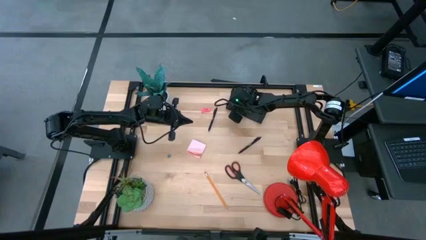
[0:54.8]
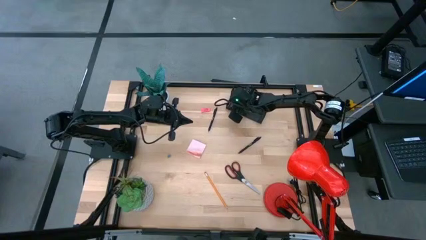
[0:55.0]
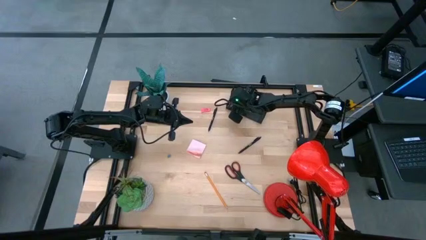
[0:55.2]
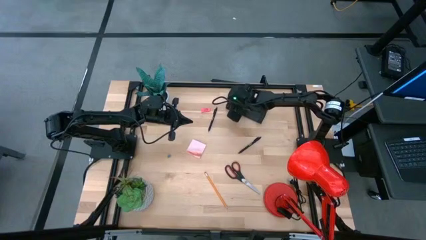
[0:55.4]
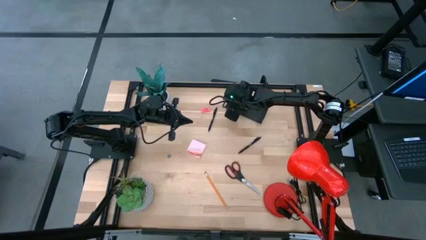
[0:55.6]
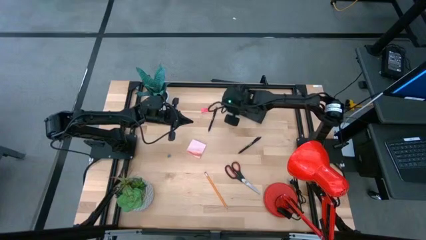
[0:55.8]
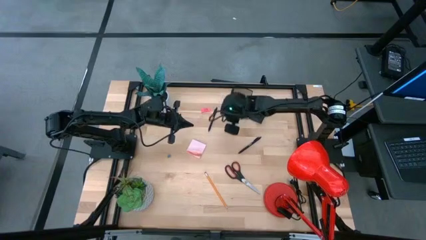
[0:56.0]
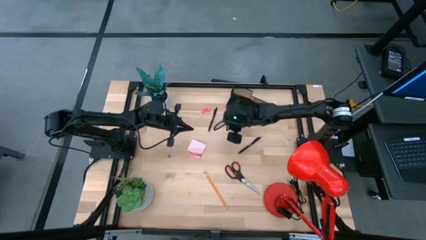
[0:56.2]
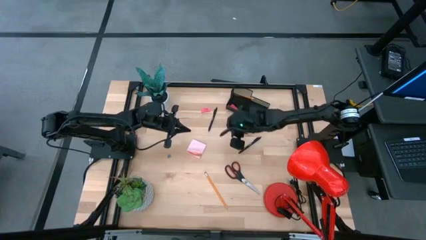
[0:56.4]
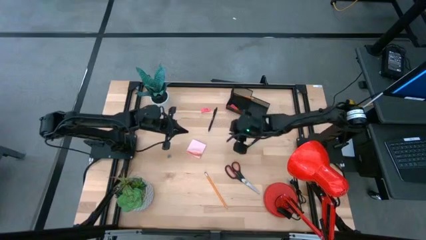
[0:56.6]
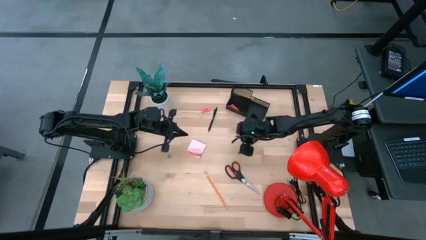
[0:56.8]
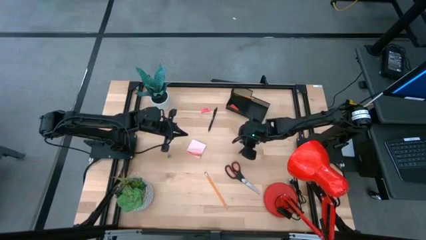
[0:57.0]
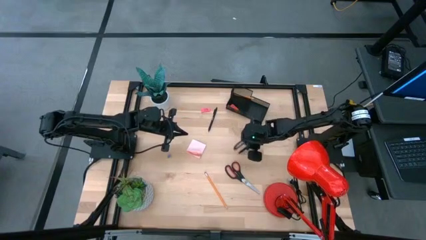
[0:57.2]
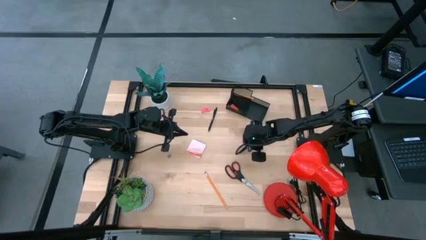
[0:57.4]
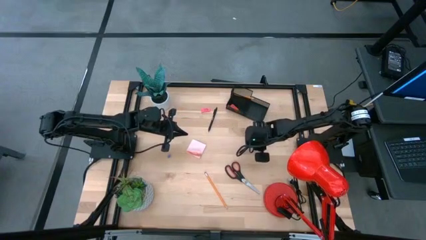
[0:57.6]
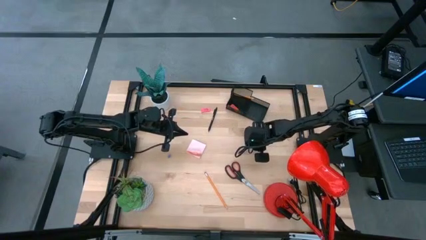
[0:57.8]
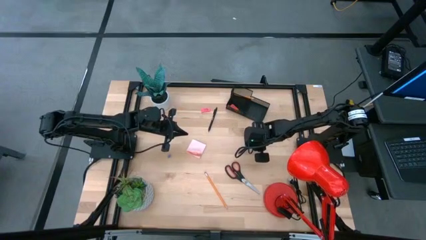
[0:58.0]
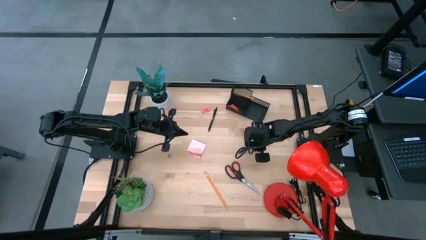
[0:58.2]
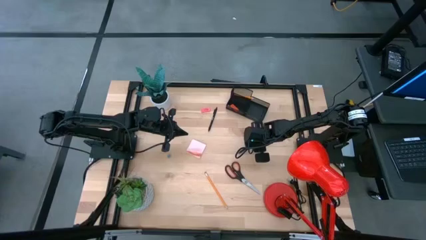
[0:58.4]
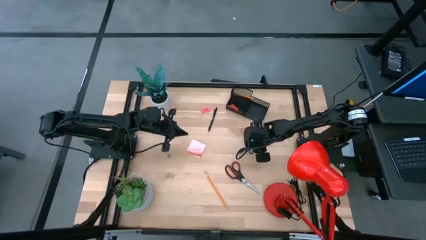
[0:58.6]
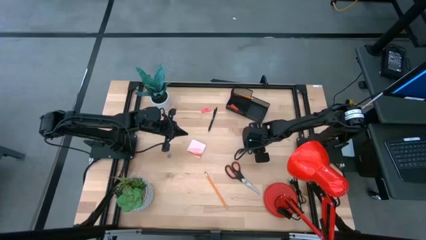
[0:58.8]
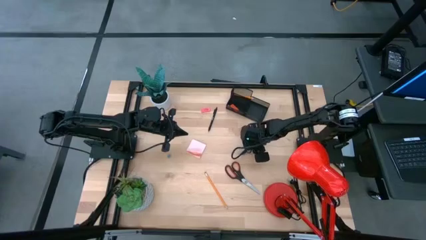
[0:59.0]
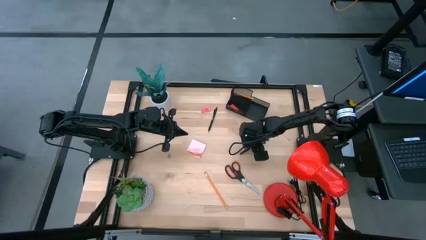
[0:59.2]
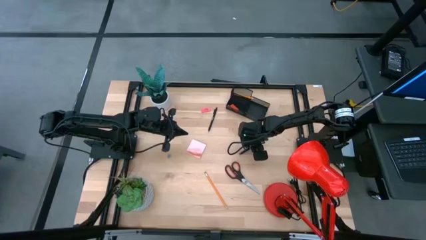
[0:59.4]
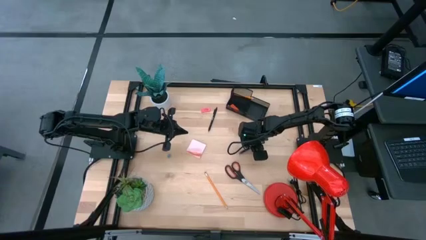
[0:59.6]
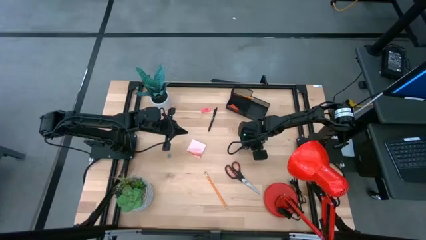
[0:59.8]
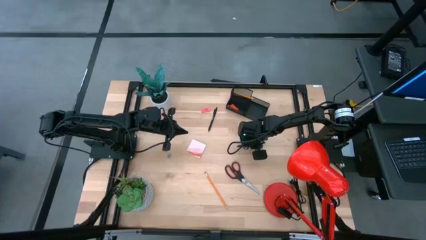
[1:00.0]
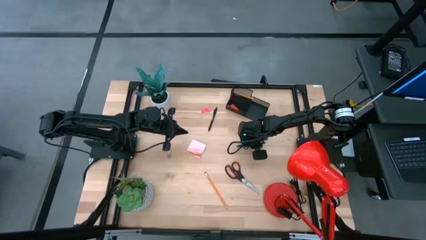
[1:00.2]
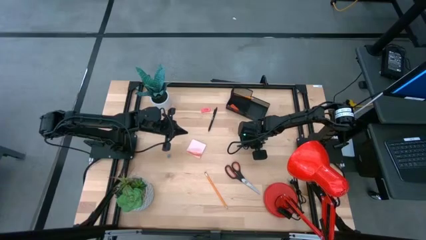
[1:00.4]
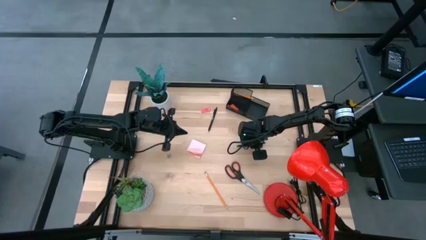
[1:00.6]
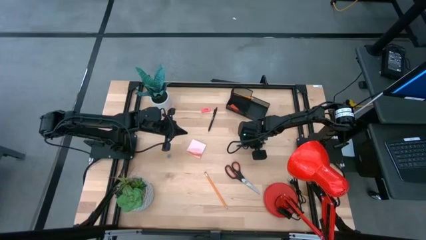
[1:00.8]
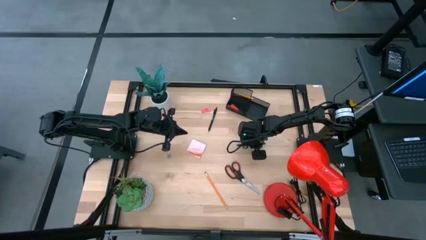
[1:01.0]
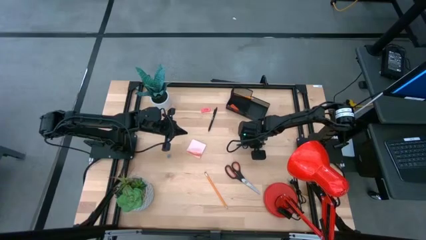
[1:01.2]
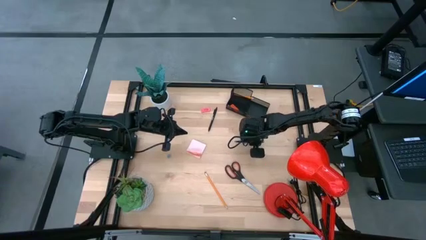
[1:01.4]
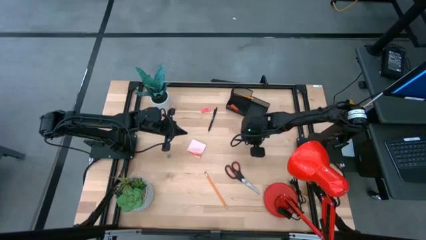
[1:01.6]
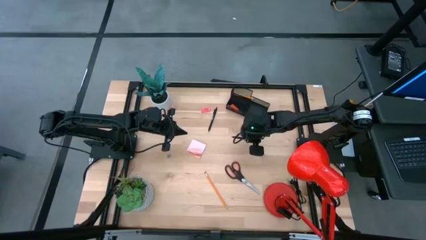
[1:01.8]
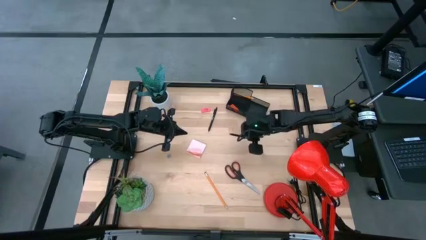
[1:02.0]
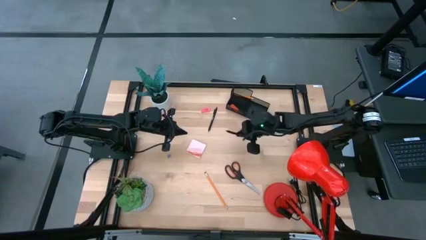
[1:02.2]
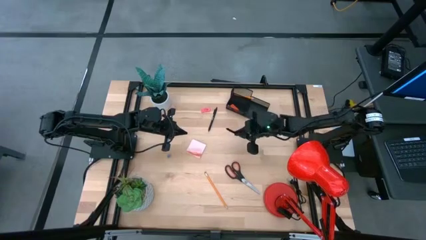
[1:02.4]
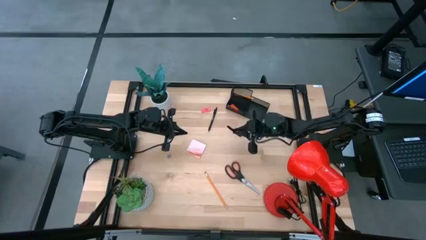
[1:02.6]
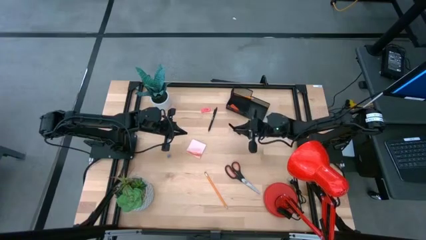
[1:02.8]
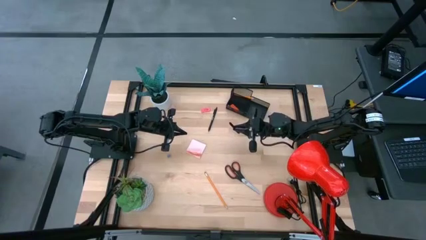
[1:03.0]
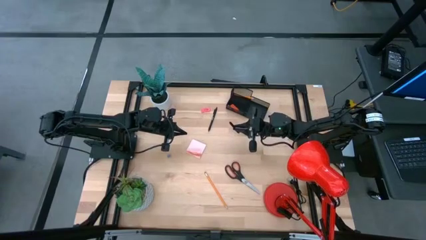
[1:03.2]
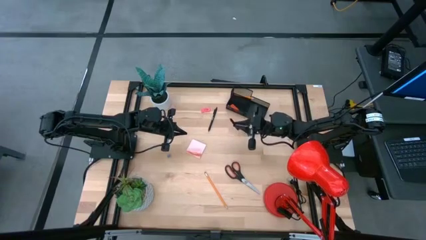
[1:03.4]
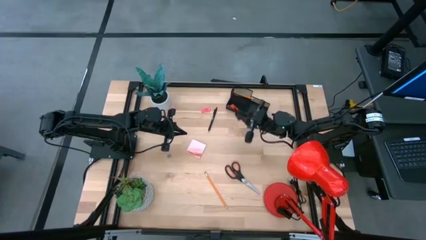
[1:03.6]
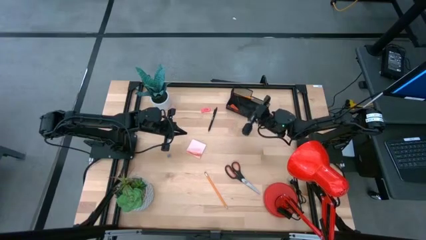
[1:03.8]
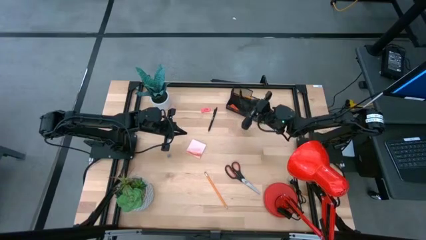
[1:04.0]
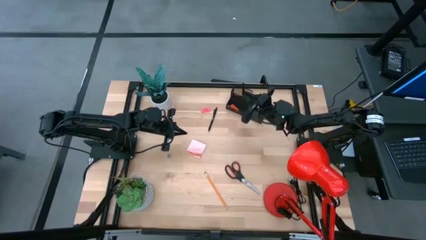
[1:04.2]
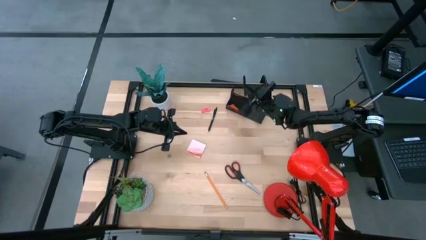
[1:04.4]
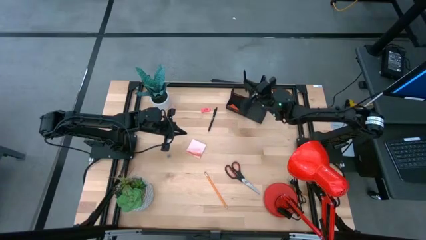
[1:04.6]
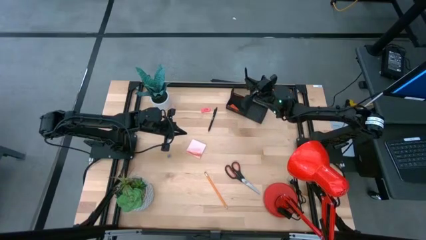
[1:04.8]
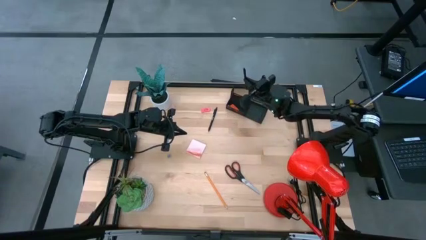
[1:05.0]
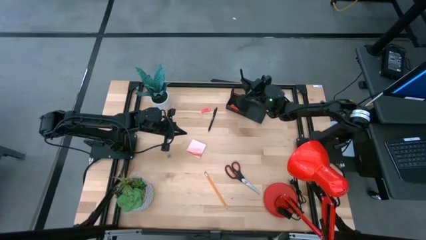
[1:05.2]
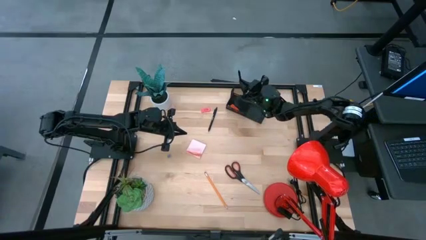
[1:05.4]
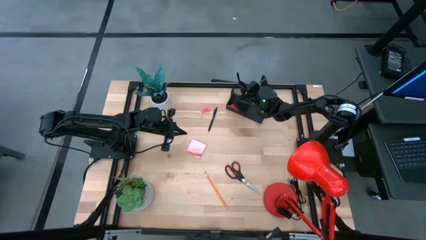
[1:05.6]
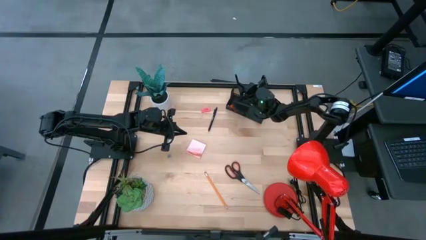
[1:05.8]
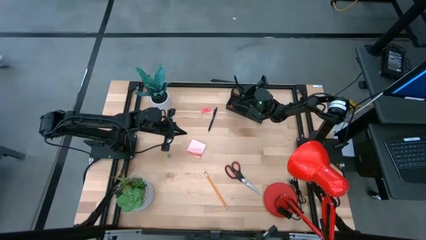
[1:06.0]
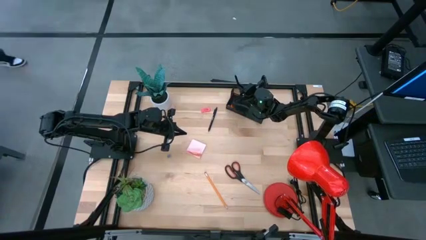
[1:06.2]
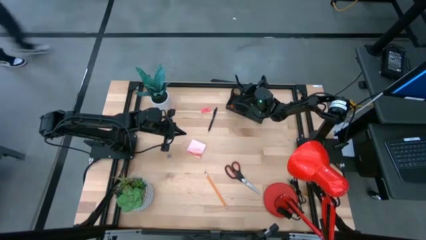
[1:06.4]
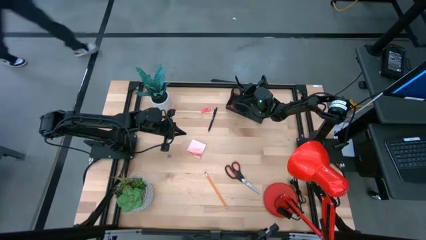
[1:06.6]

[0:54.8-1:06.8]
Task: Pick and place office supplies into organizer
Put the bottom black ballpen into the black desk organizer
